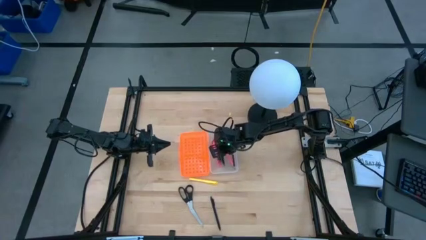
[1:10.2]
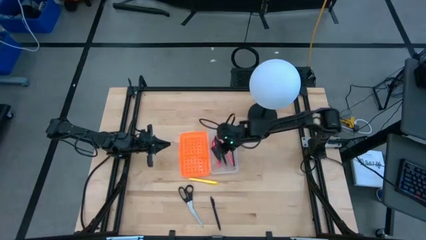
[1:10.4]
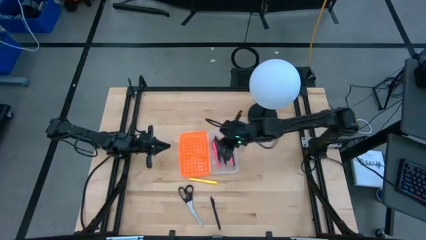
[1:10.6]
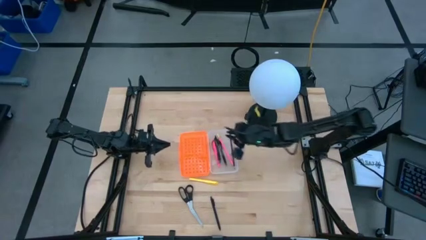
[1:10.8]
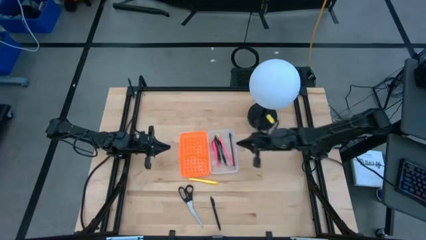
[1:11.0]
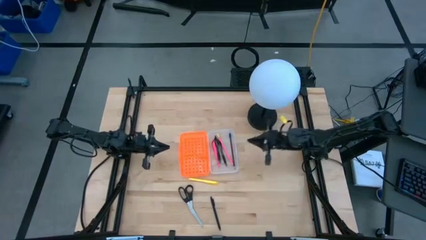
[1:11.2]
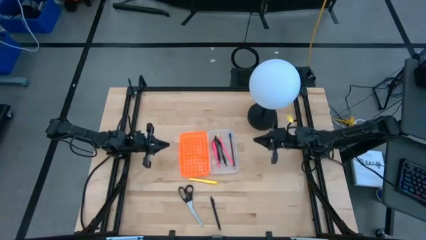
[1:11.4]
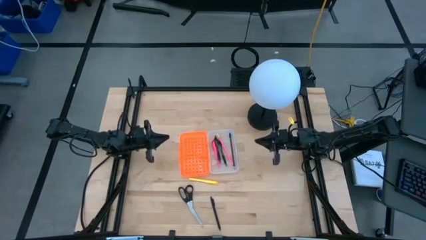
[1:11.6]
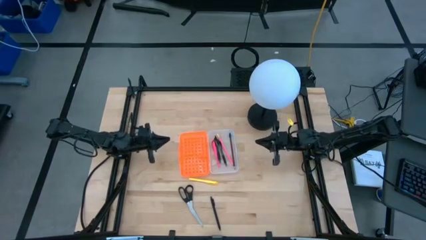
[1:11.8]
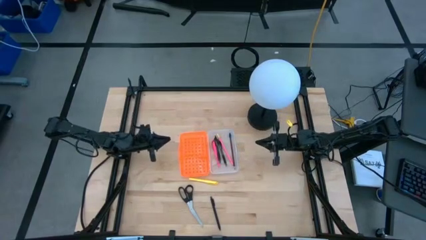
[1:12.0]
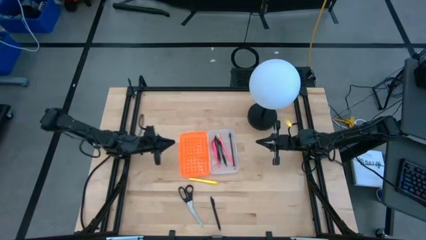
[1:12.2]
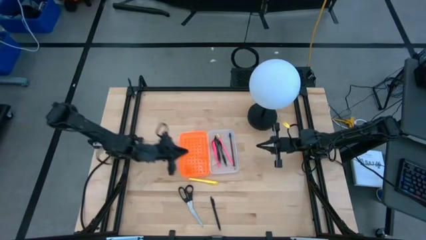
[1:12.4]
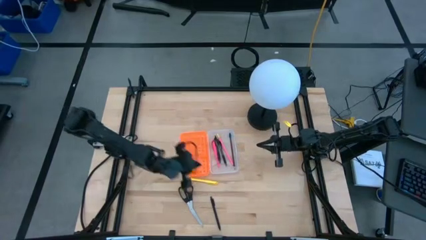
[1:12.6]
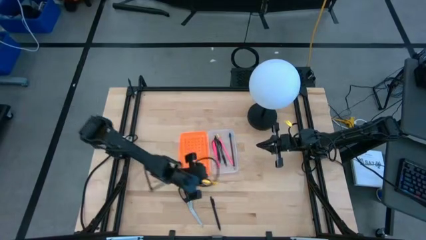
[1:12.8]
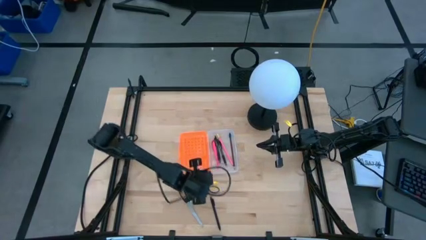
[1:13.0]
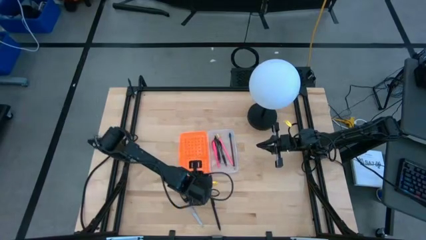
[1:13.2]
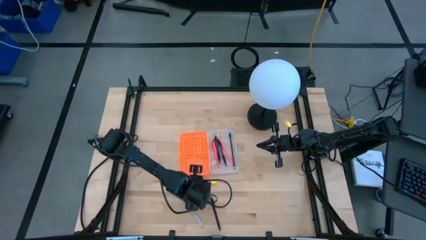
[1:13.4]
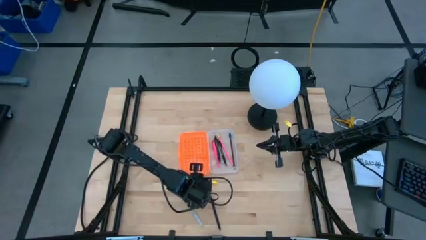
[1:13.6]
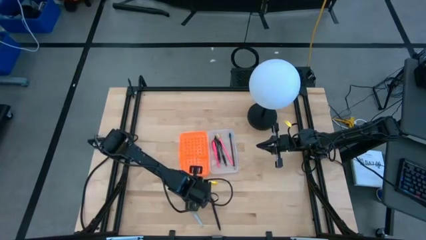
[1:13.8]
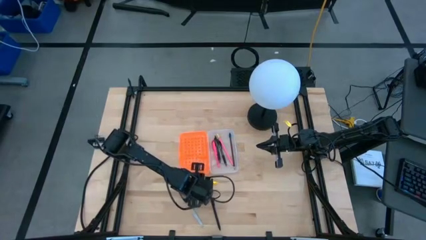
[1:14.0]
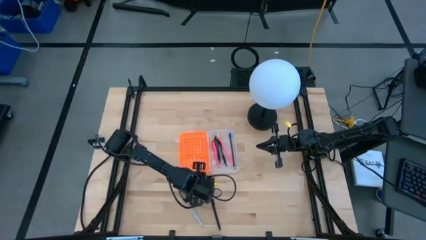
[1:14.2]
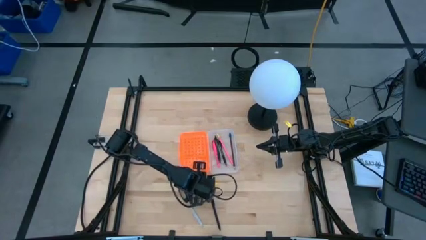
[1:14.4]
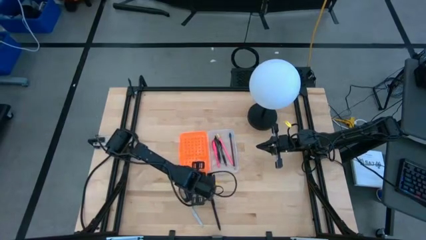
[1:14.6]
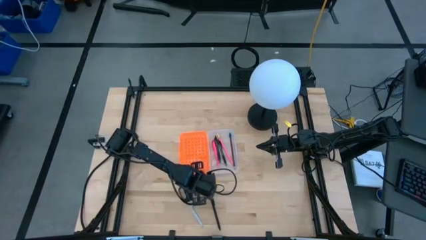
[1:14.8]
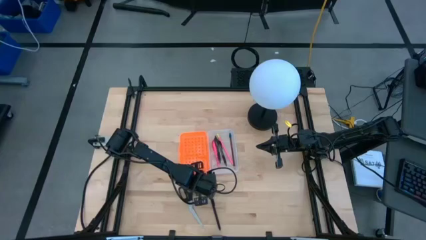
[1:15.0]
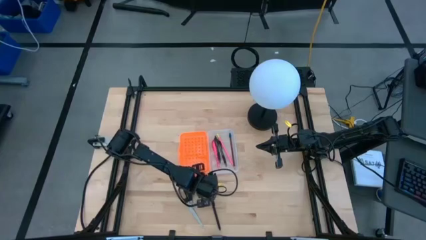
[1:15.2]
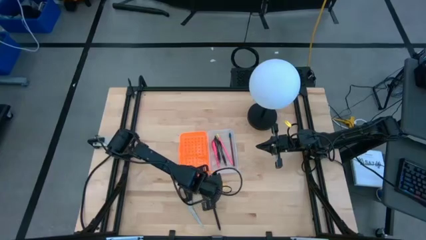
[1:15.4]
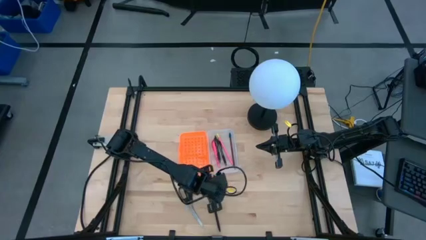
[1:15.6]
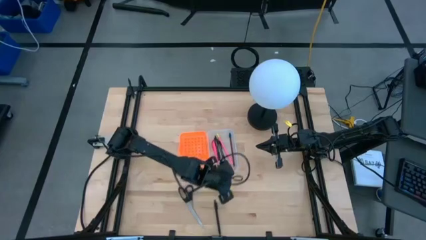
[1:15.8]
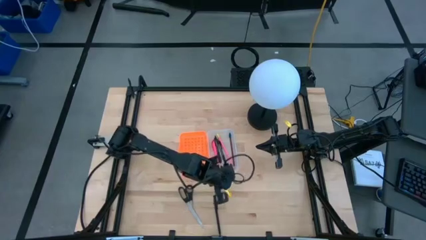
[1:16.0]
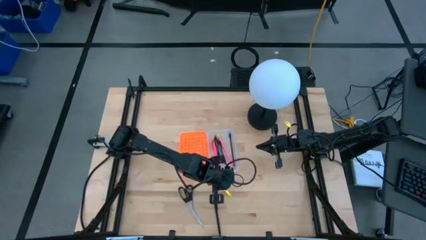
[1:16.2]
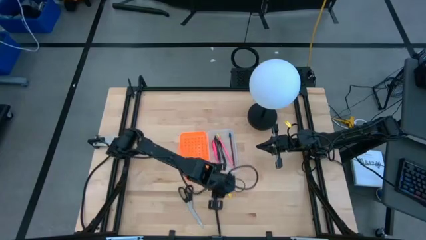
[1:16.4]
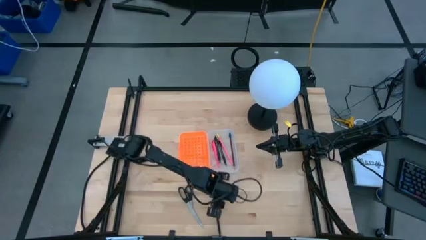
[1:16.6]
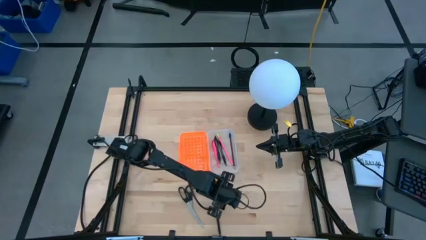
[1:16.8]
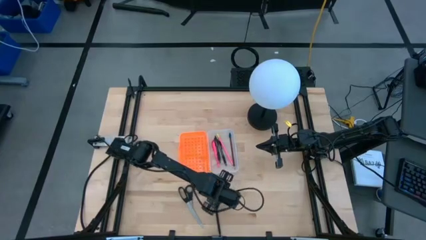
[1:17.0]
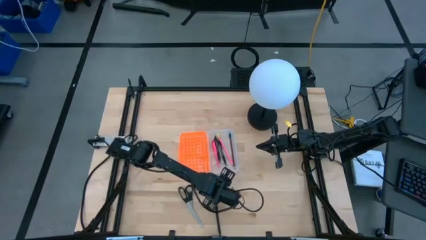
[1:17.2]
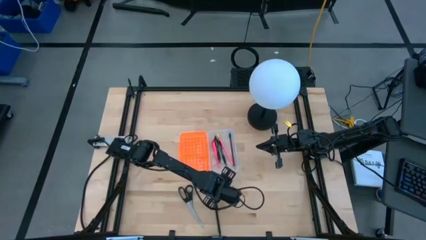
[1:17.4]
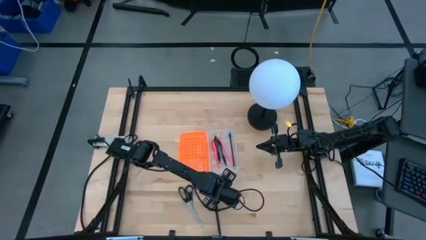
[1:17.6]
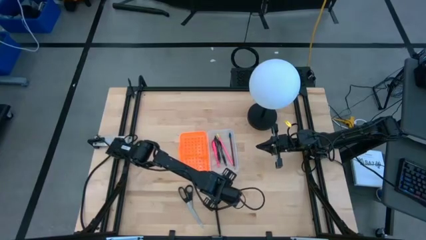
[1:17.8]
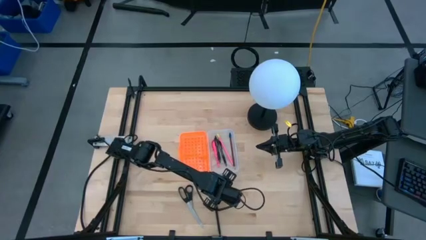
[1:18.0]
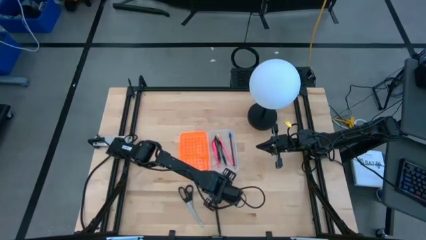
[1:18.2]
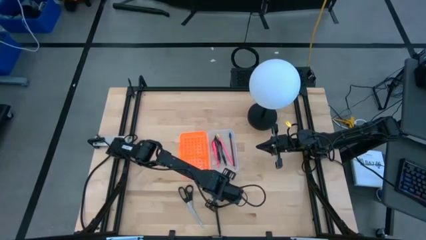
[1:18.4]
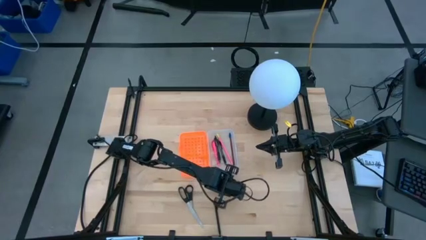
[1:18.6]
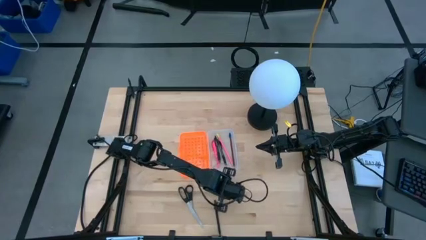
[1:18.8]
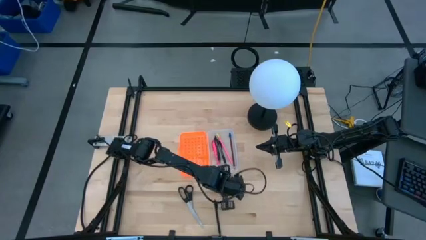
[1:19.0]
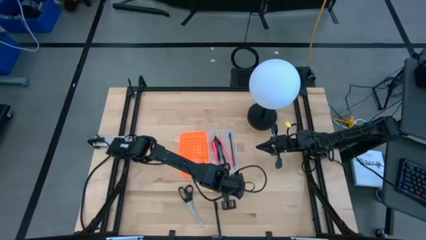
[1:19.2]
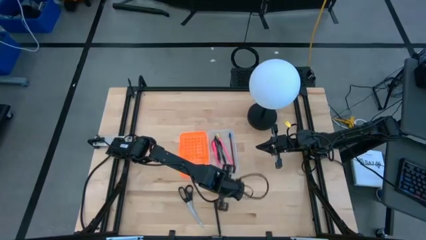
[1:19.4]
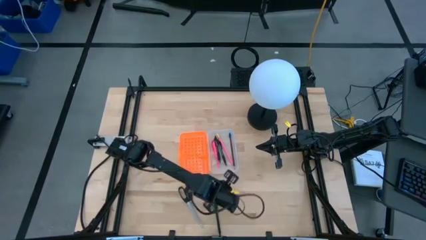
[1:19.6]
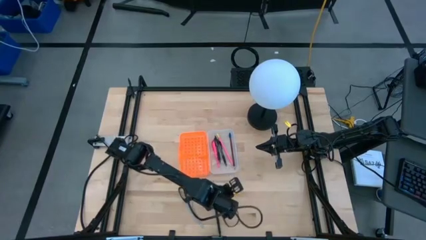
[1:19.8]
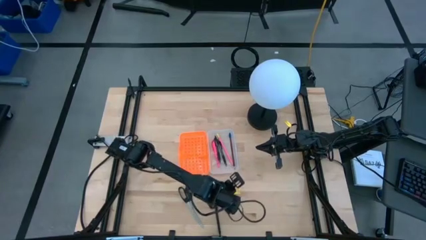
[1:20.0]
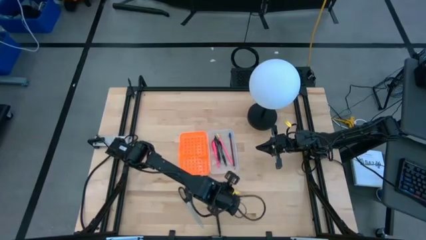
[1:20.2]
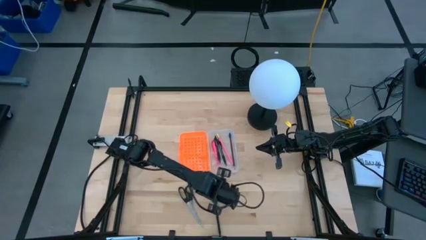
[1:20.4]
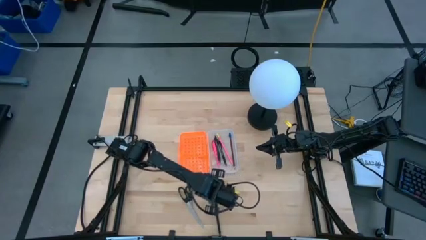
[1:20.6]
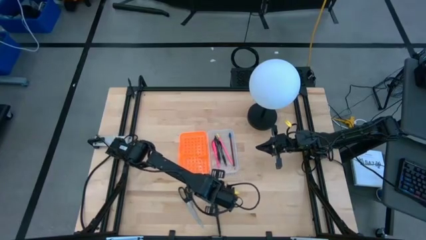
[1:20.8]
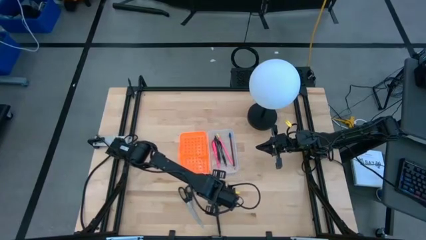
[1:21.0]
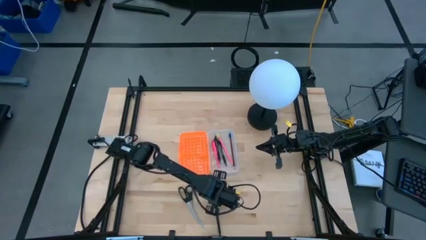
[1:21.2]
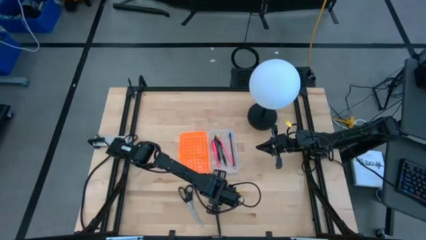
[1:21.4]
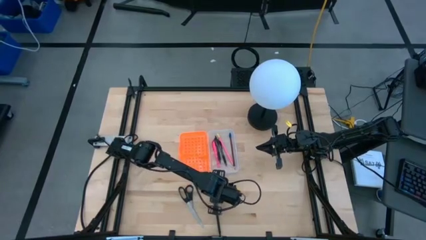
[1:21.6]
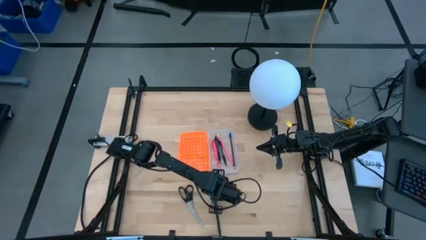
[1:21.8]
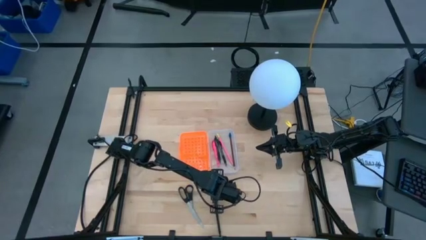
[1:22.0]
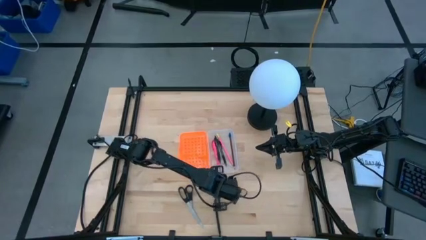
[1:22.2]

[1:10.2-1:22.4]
Task: Pick & place school supplies into a supply box
Put the yellow pen into the supply box

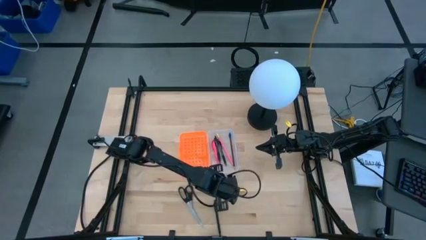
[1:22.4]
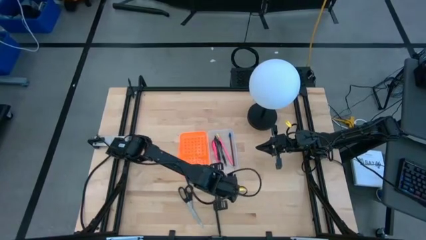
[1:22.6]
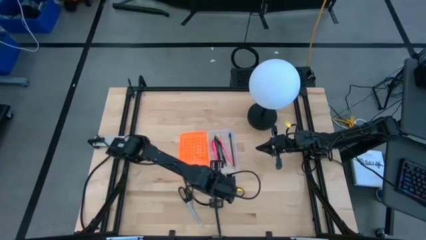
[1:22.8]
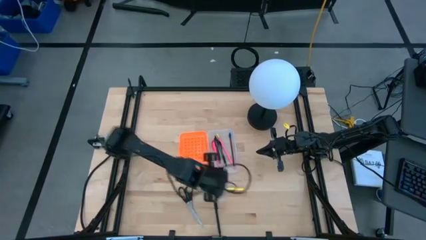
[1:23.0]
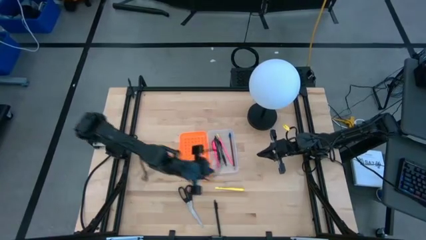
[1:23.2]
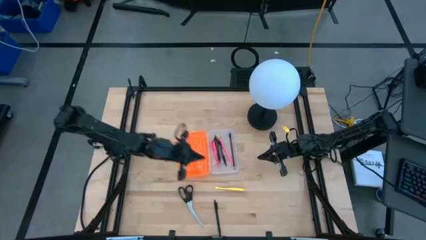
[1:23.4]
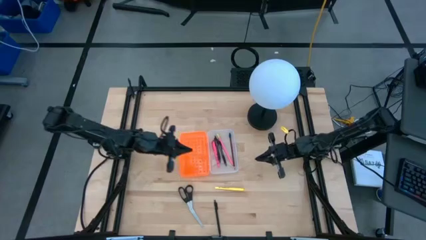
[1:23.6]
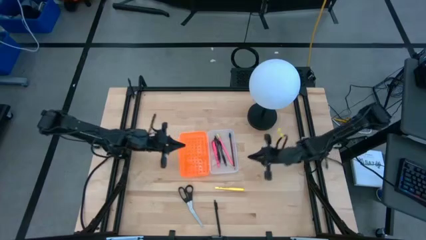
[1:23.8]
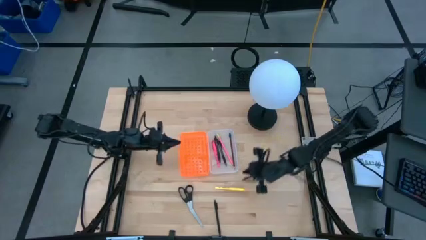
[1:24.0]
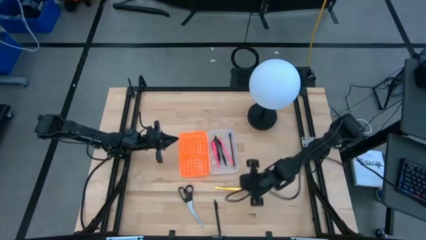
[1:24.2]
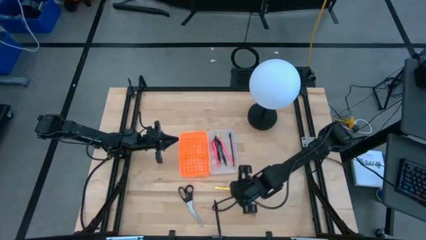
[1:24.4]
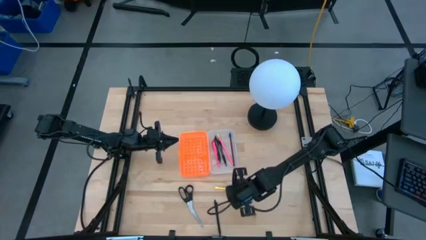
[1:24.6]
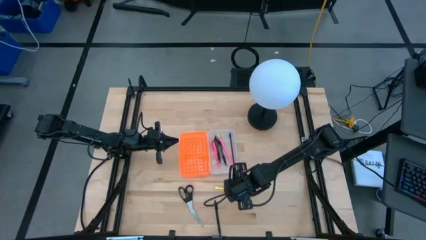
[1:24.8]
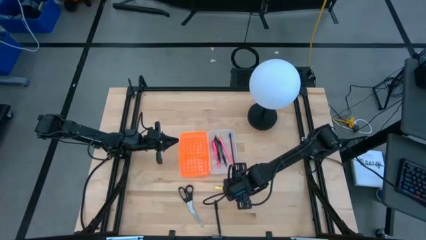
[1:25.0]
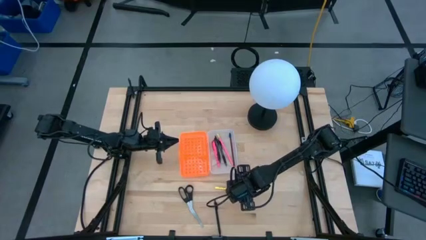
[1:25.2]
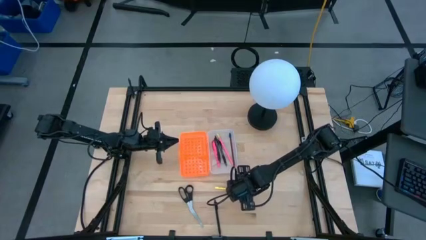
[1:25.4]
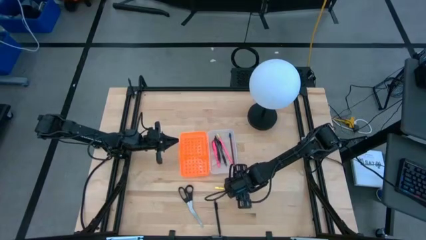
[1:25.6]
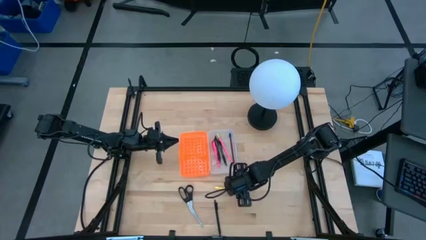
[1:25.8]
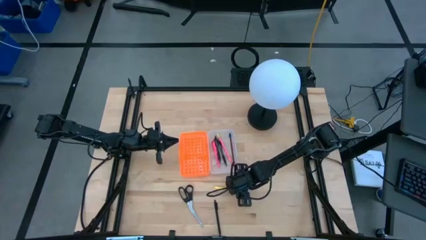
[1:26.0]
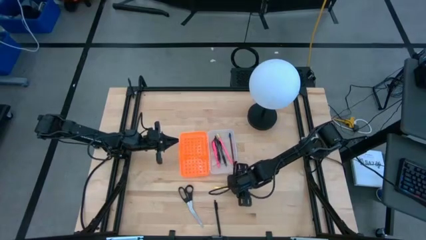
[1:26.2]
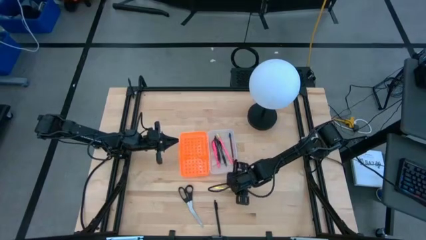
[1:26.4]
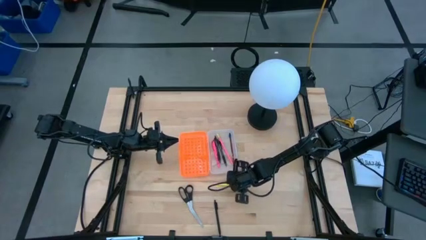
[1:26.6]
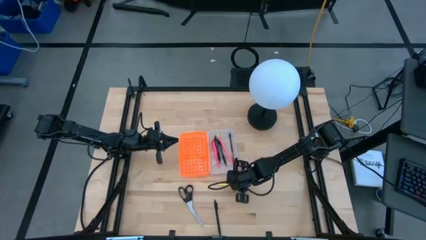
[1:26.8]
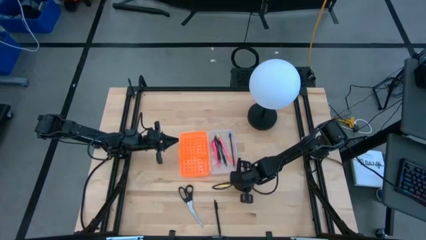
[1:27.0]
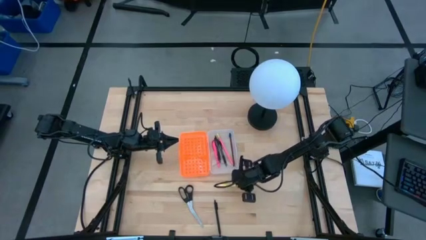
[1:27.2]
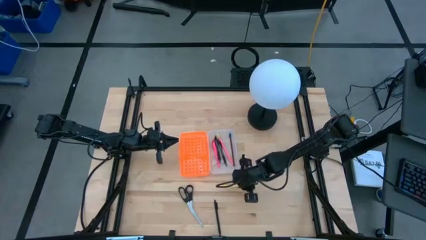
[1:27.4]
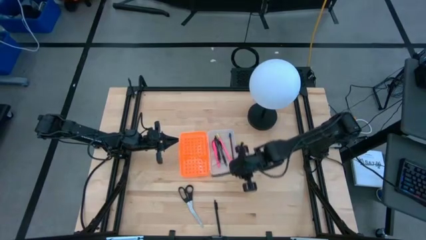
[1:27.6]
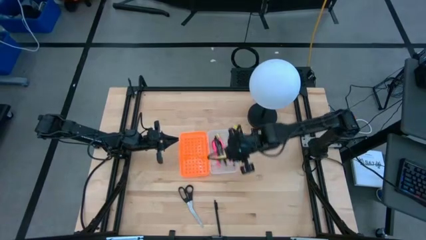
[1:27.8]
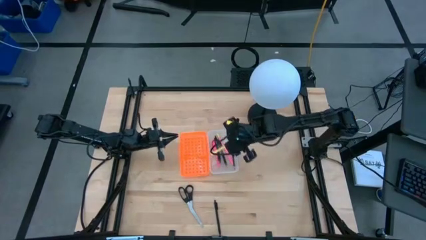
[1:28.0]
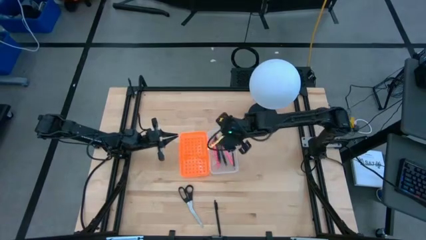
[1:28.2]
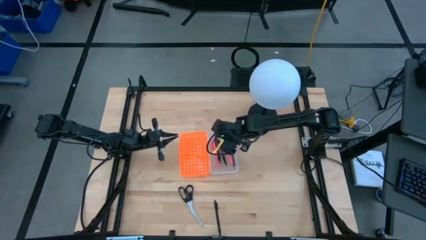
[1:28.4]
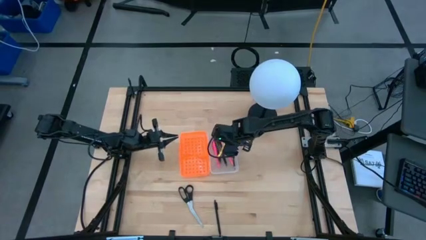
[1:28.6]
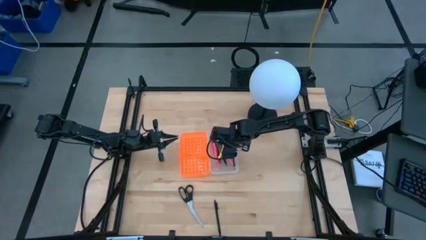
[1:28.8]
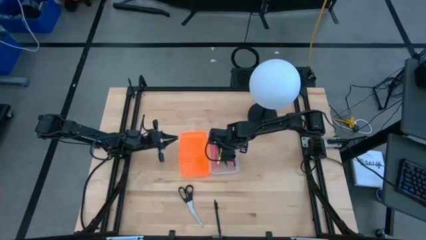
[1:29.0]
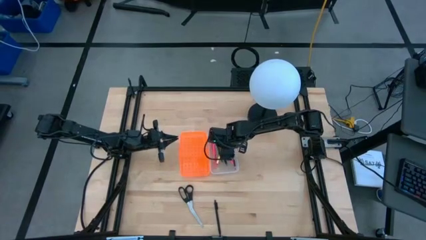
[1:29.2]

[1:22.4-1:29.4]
Put the yellow pen into the supply box
